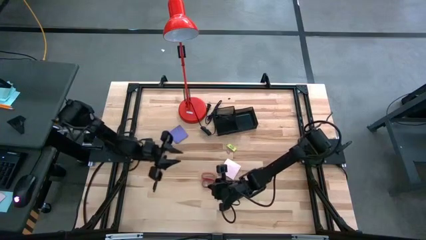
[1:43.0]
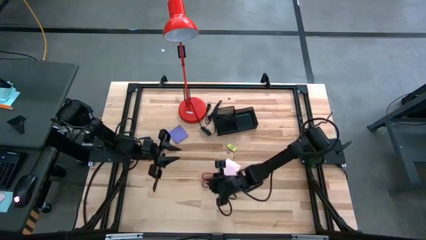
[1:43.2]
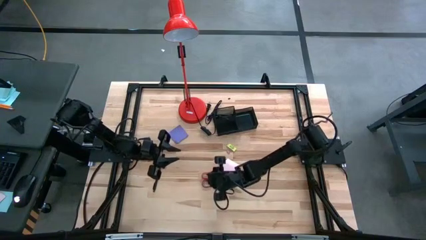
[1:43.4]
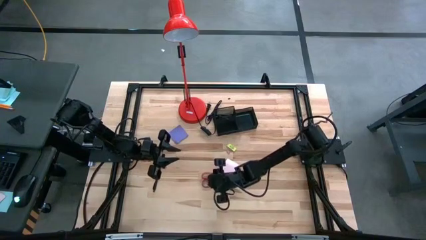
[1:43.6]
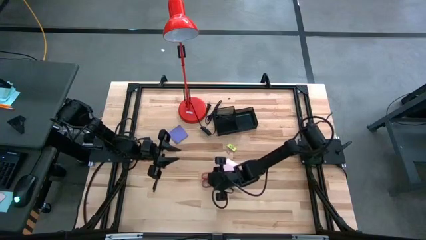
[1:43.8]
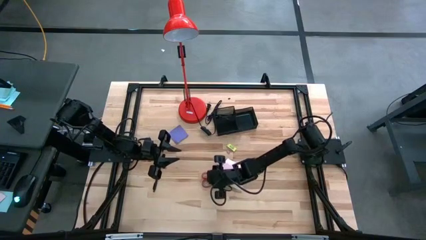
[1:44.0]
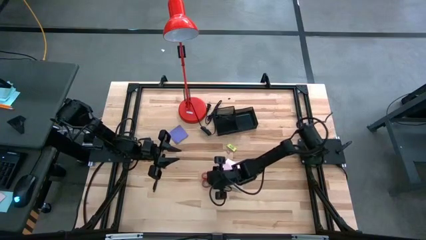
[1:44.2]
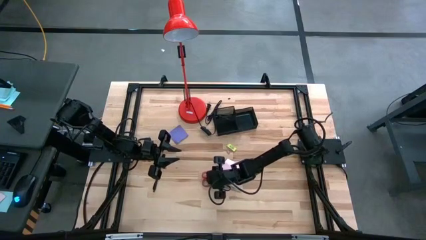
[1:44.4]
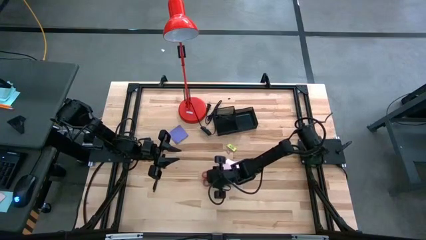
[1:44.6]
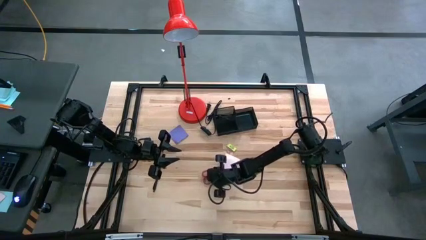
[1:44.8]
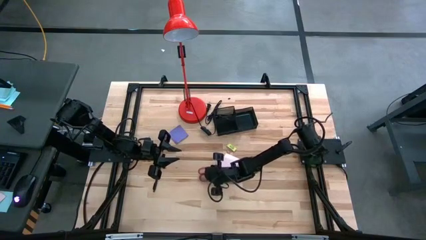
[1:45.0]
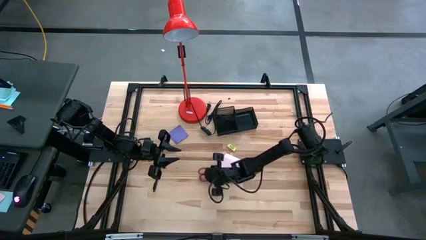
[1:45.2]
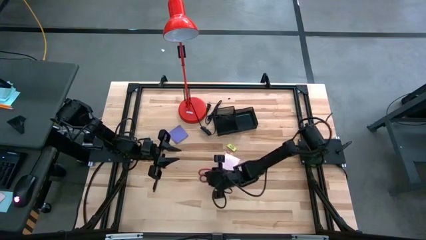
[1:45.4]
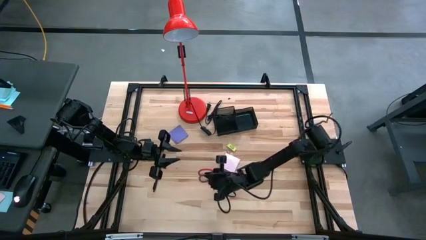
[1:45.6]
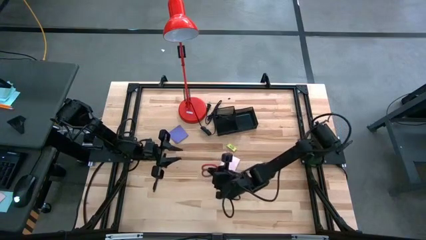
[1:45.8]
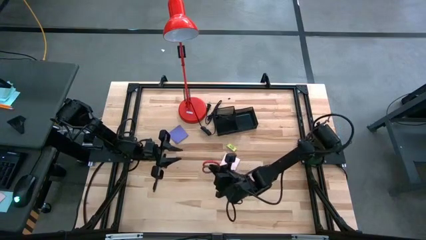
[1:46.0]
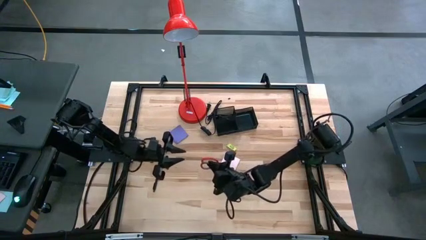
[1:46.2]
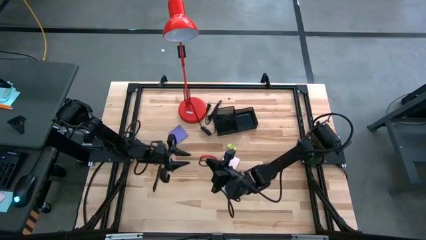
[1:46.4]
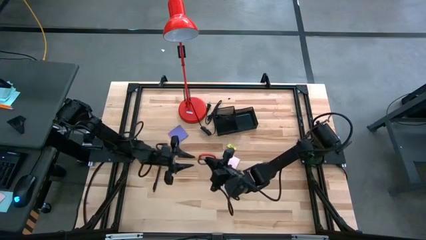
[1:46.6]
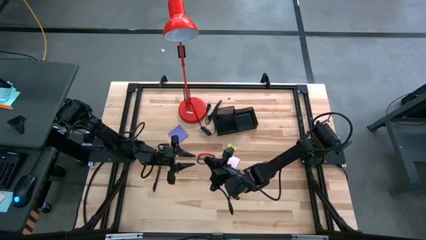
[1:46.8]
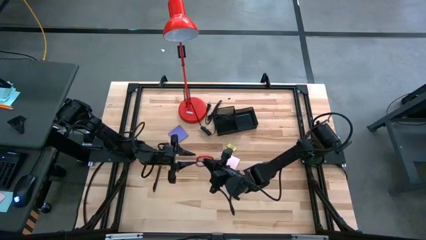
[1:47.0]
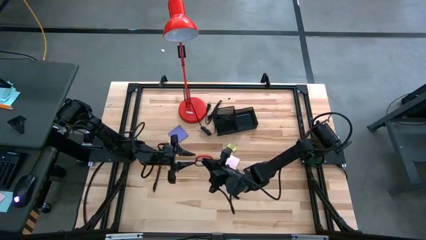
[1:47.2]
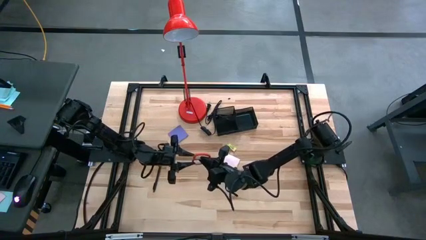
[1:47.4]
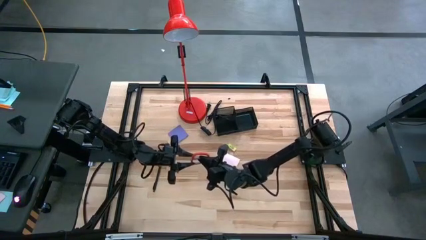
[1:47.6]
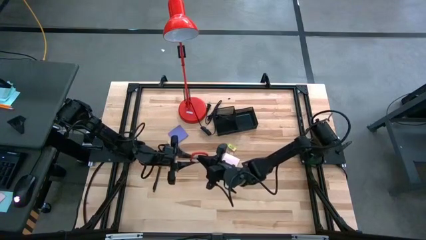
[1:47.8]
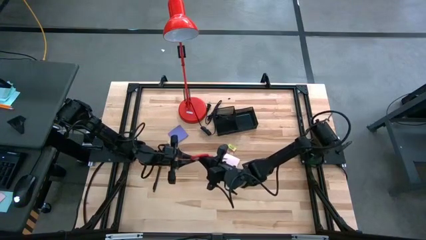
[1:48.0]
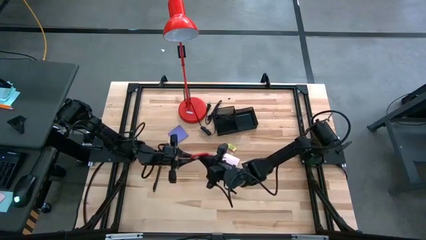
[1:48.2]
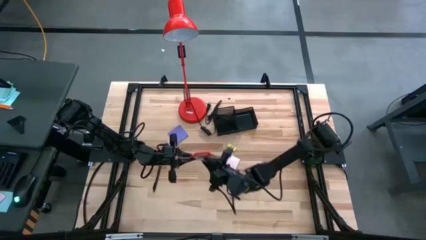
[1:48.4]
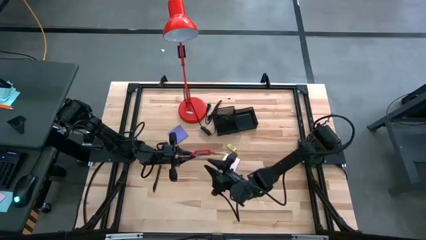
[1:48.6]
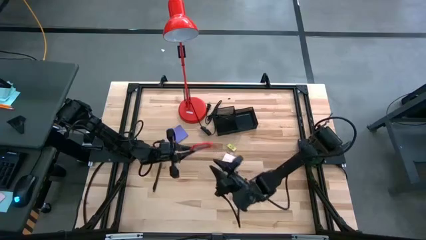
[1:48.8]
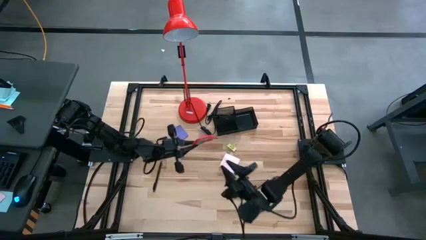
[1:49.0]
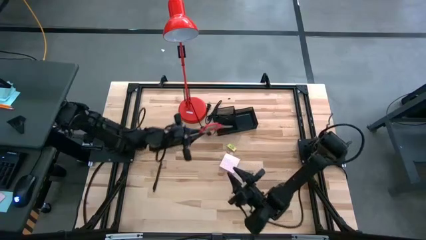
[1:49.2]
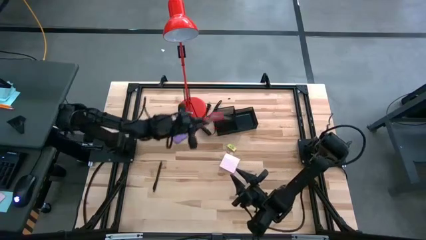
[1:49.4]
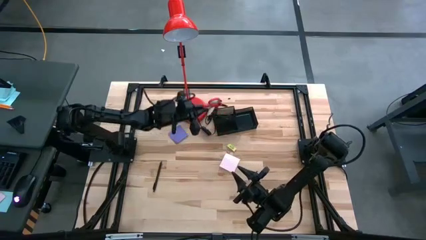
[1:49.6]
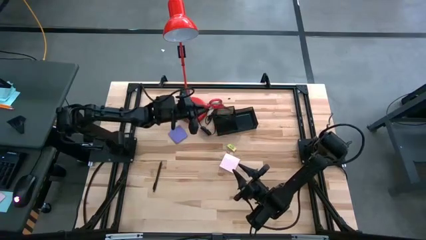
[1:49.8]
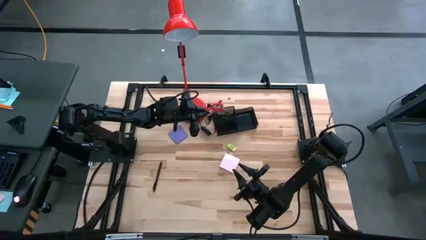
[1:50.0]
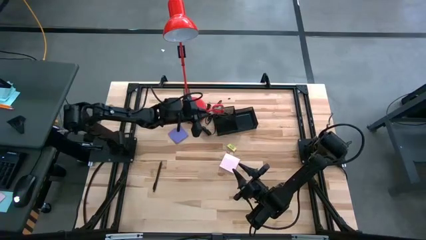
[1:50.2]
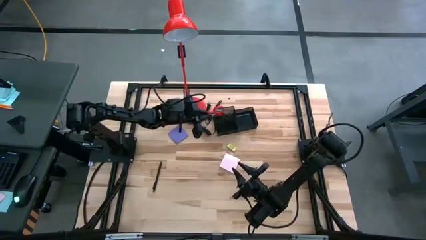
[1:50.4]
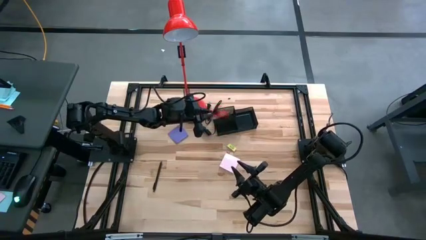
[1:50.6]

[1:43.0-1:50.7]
Task: Pick and place office supplies into organizer
Put the red scissors into the black desk organizer

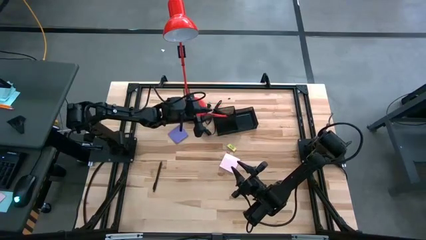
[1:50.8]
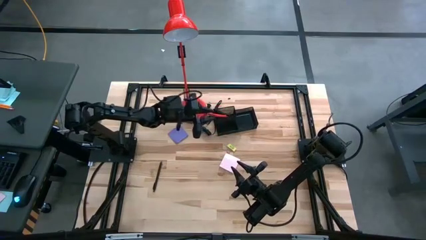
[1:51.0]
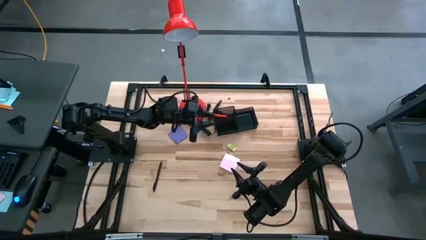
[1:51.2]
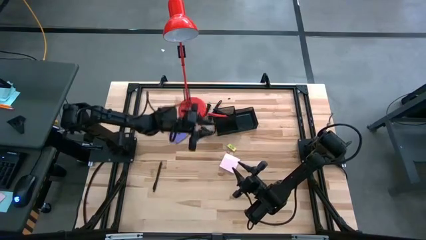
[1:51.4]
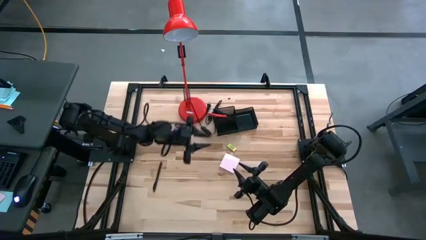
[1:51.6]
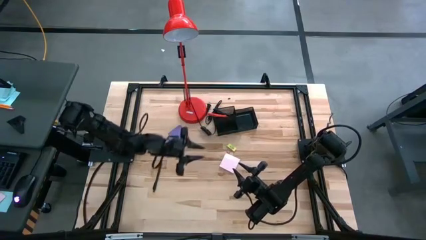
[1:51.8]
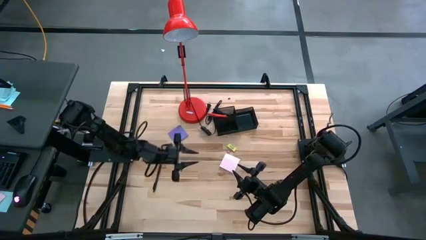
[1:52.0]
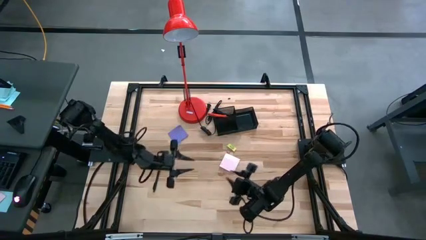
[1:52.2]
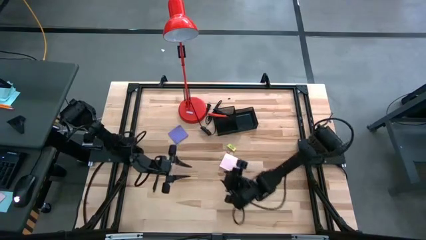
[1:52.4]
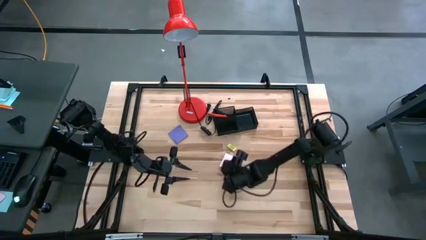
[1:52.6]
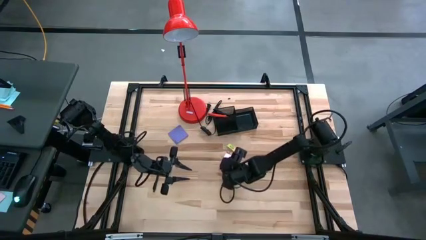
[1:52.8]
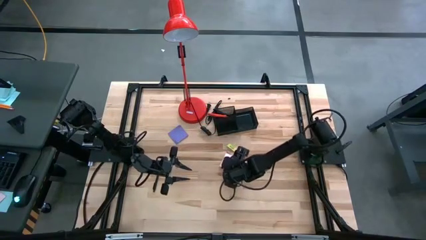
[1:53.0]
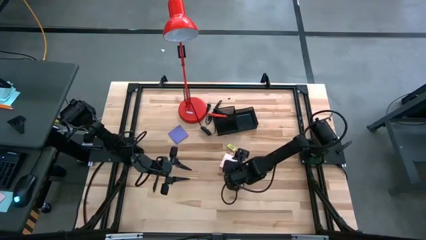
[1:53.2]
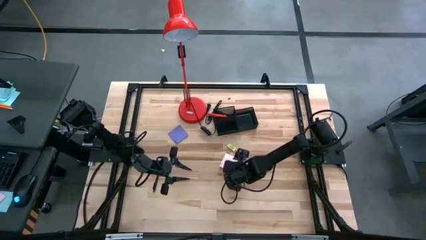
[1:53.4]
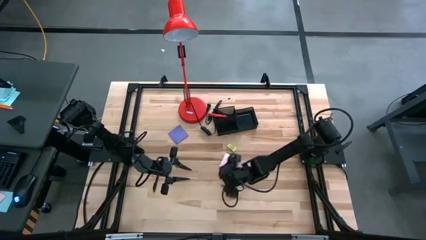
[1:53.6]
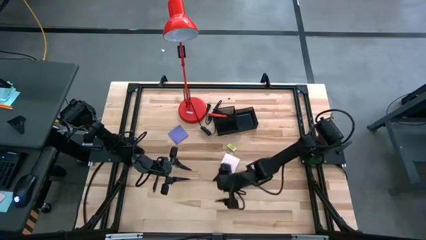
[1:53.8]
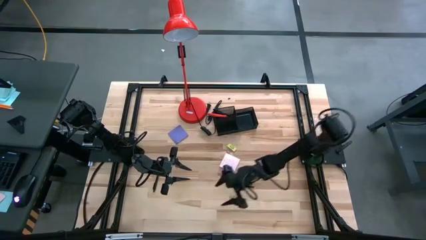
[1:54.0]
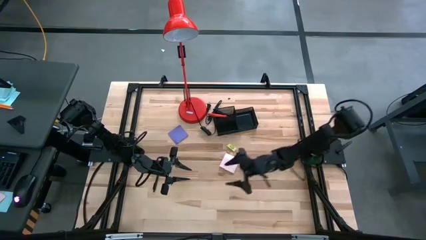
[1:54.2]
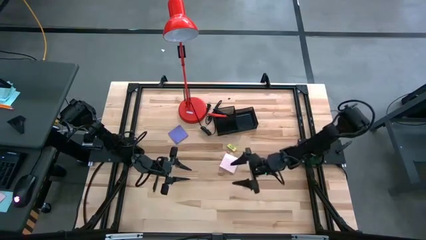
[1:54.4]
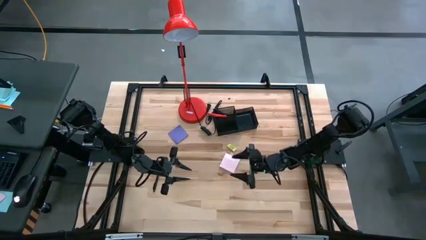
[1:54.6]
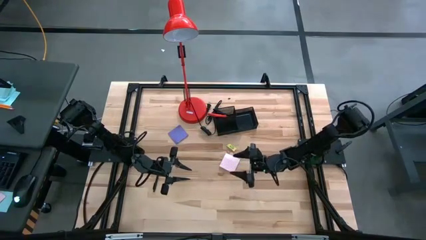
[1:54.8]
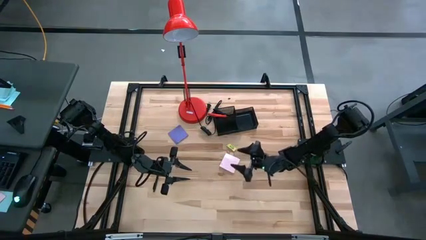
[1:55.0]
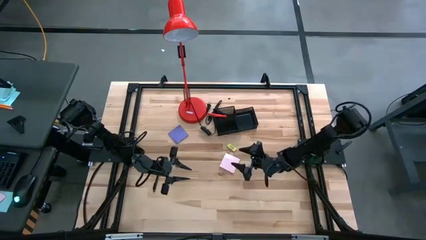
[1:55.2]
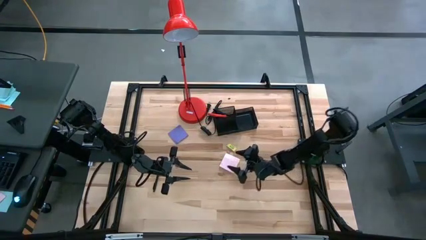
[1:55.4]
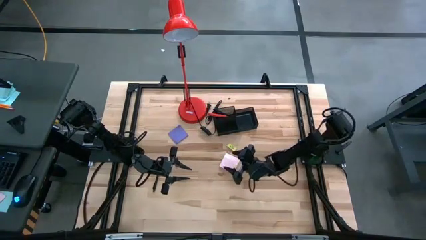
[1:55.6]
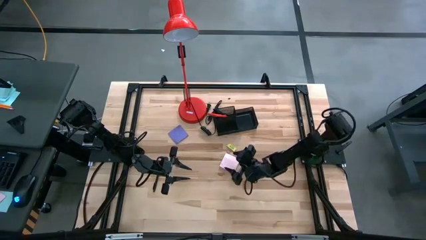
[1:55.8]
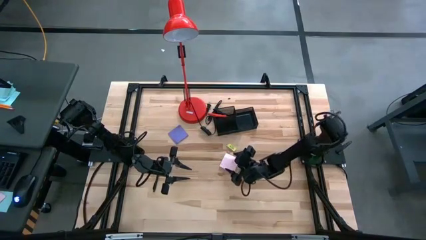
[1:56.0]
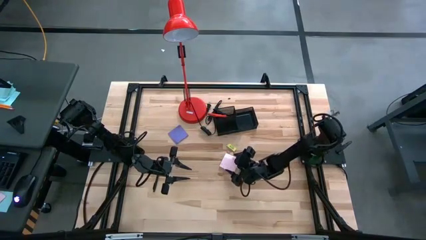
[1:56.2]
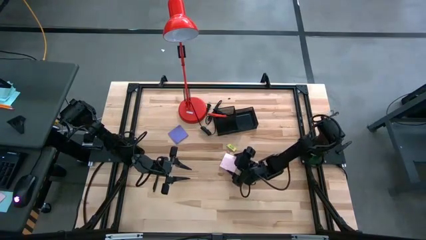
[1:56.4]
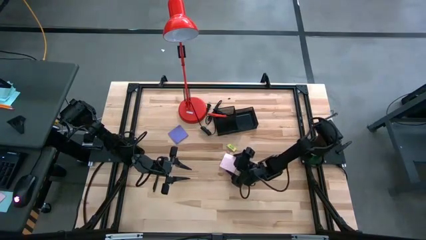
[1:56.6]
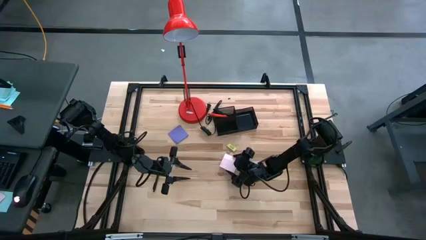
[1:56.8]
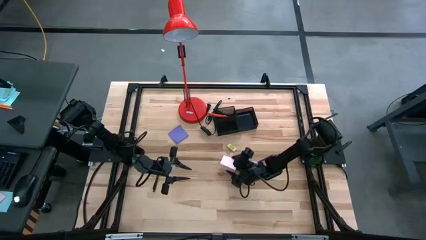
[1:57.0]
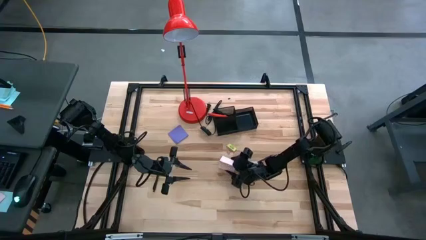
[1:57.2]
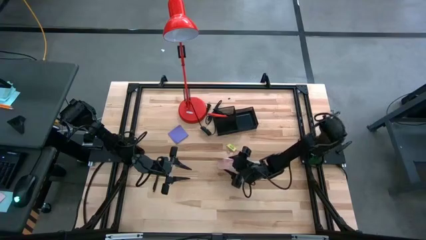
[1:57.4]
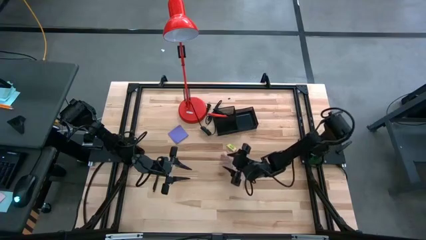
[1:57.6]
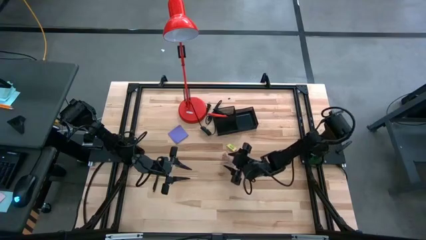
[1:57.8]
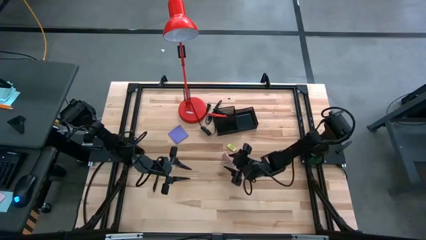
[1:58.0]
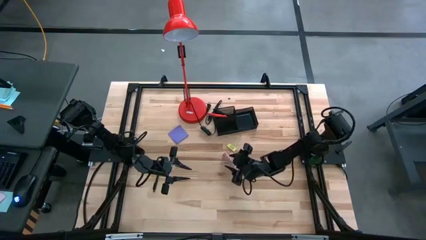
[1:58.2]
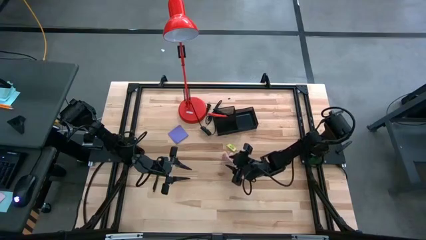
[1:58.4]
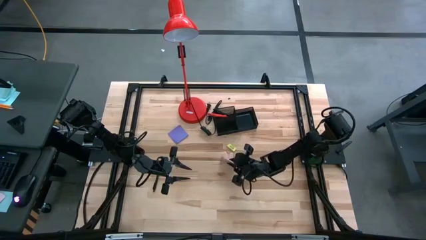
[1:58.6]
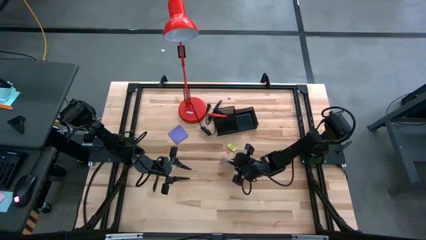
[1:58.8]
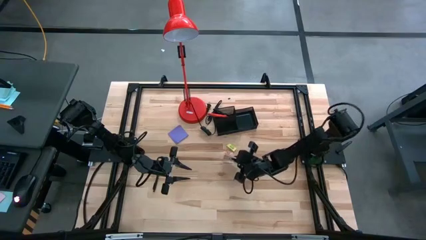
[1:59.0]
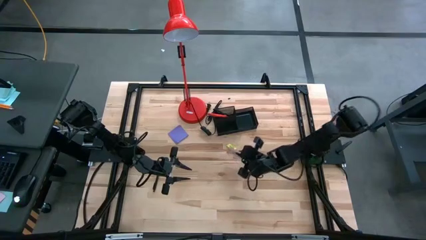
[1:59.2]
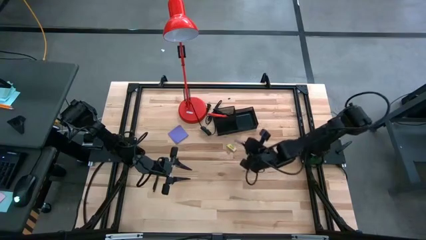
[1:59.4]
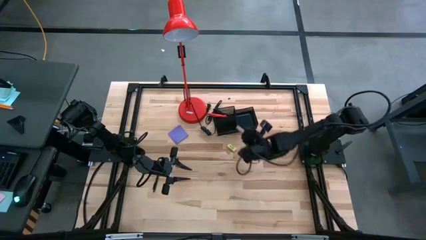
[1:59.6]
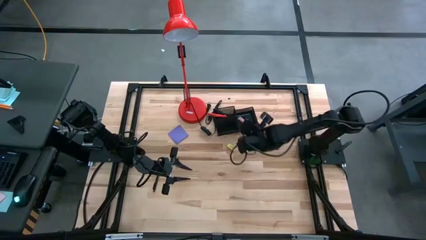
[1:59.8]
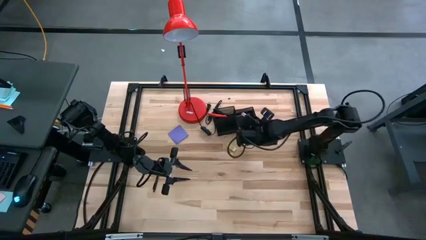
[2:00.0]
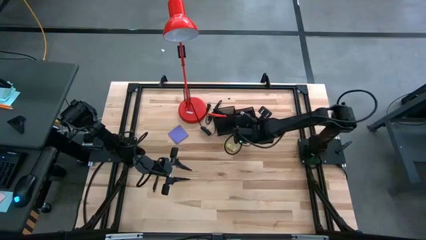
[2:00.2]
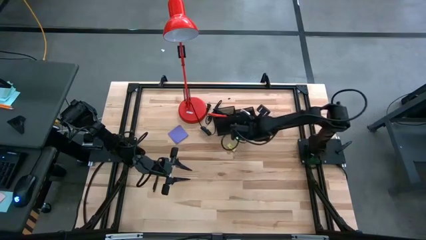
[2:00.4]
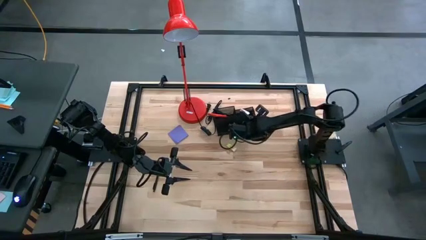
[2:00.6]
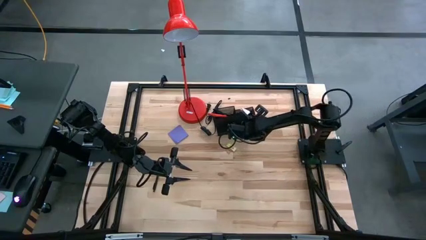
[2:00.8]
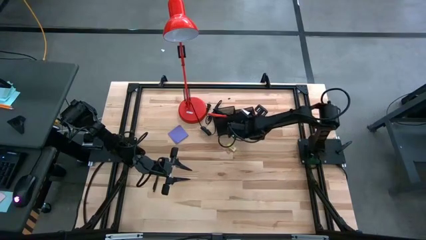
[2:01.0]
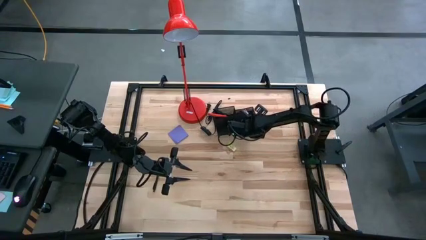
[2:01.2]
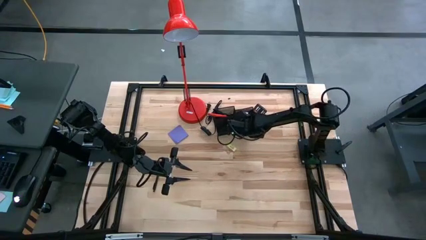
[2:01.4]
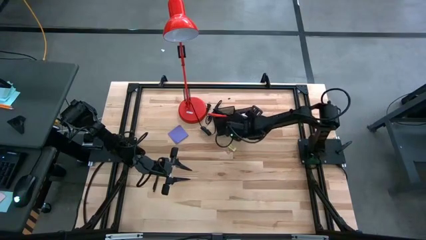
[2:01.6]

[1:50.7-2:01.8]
Put the pink sticky notes into the black desk organizer
